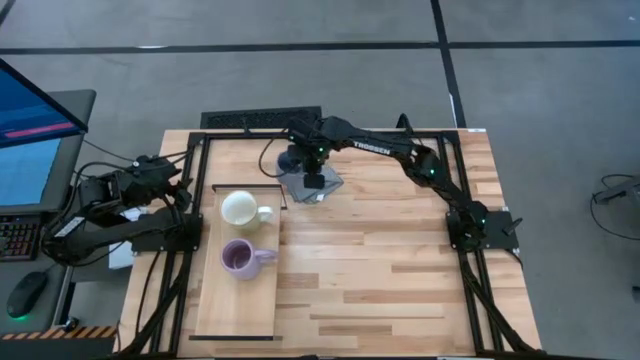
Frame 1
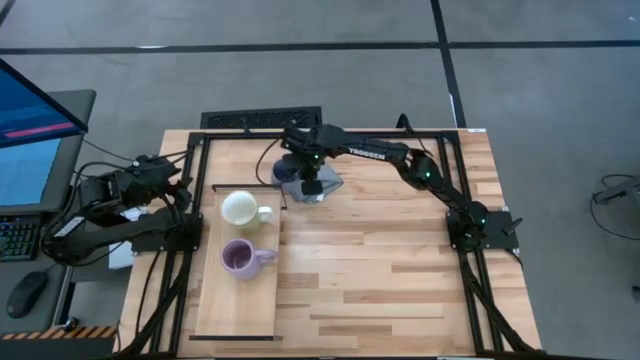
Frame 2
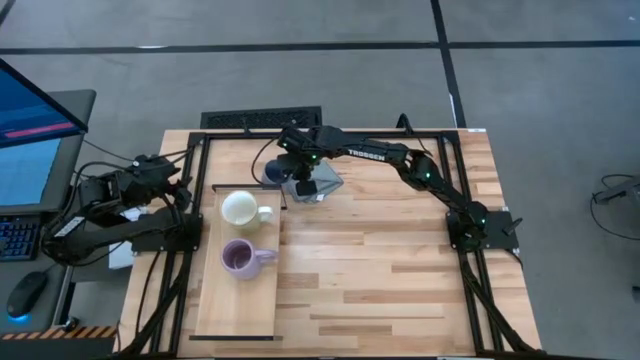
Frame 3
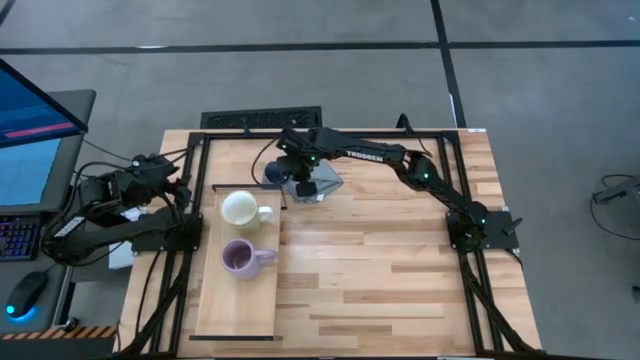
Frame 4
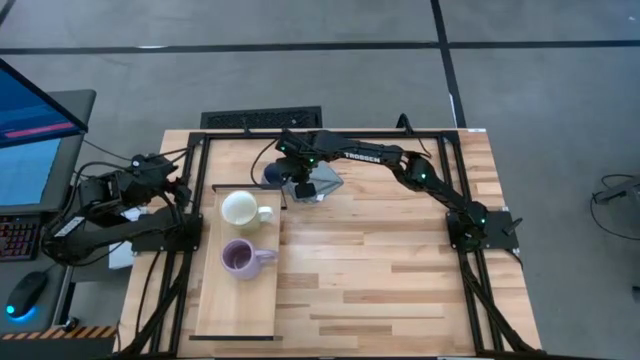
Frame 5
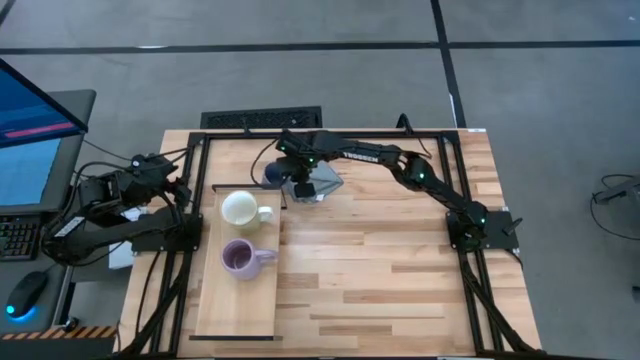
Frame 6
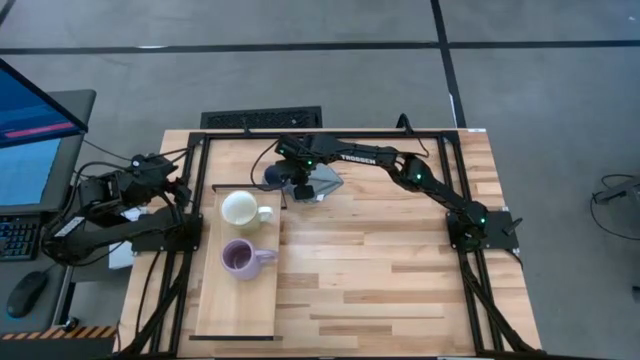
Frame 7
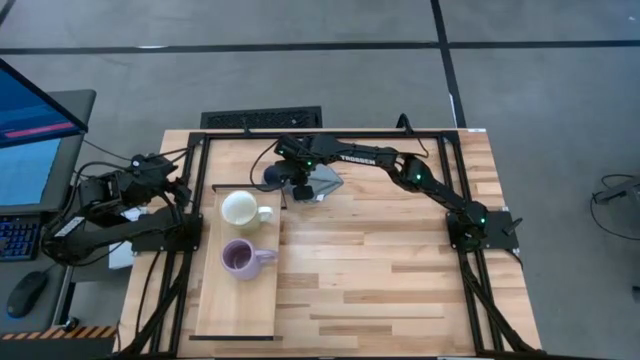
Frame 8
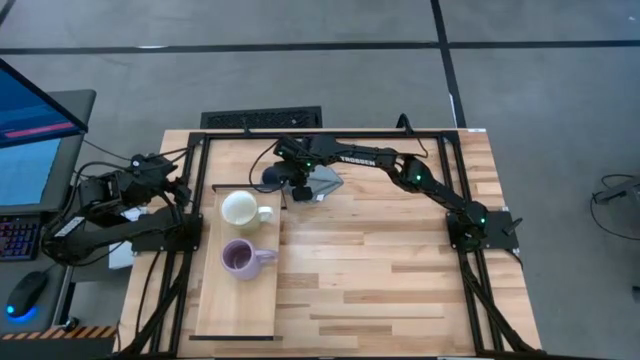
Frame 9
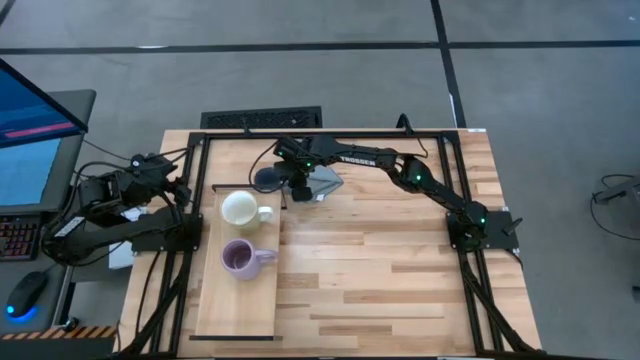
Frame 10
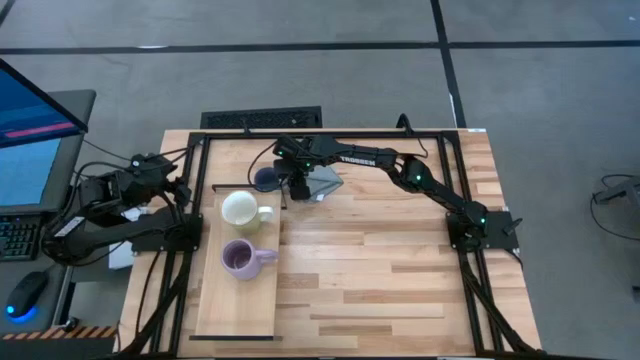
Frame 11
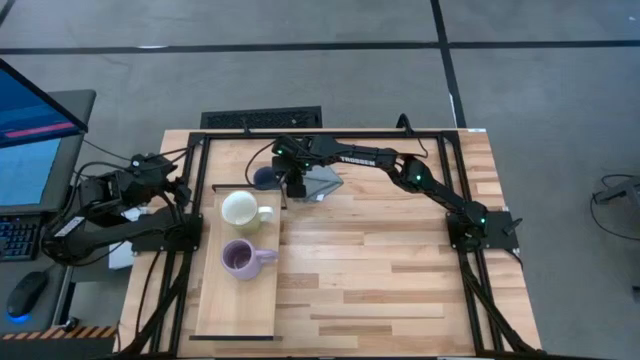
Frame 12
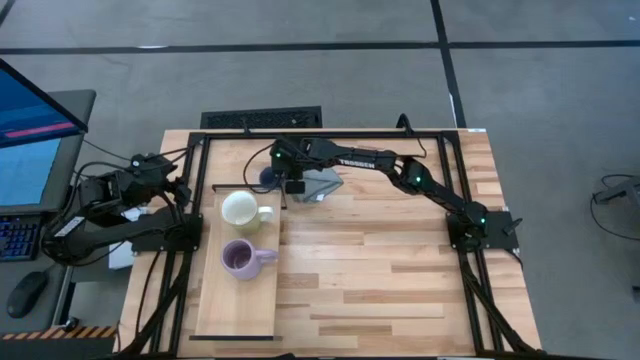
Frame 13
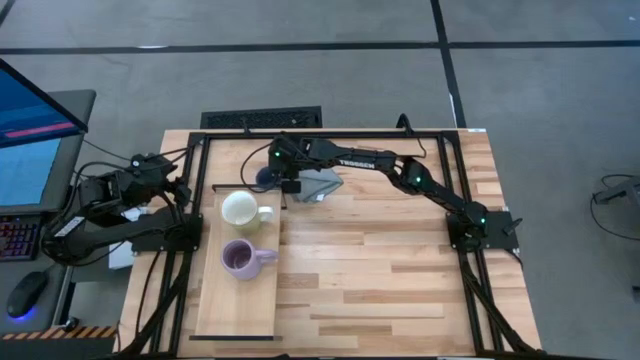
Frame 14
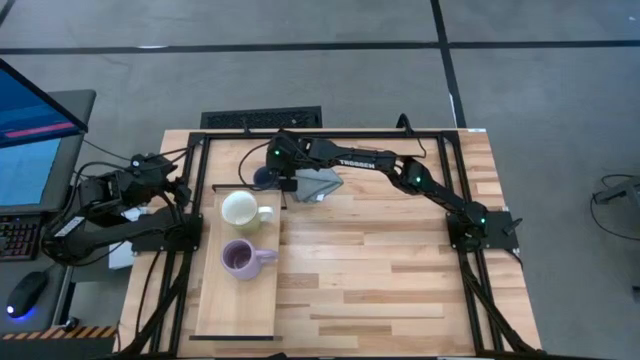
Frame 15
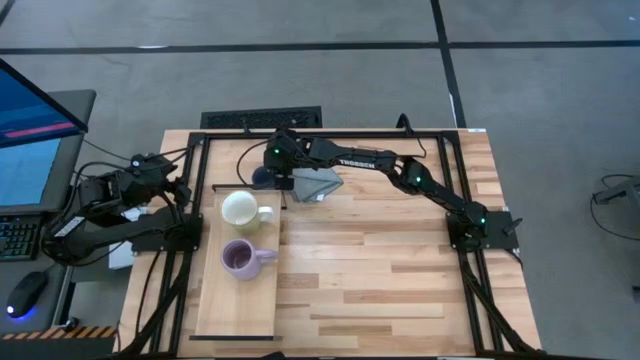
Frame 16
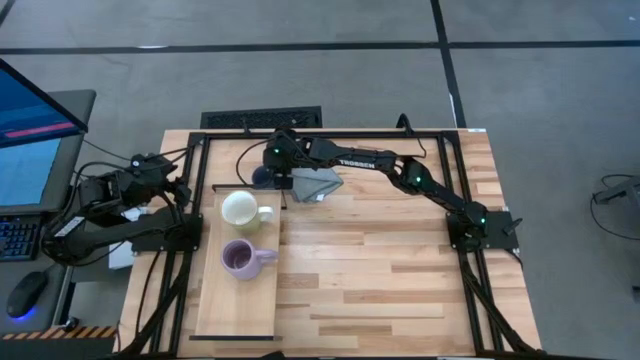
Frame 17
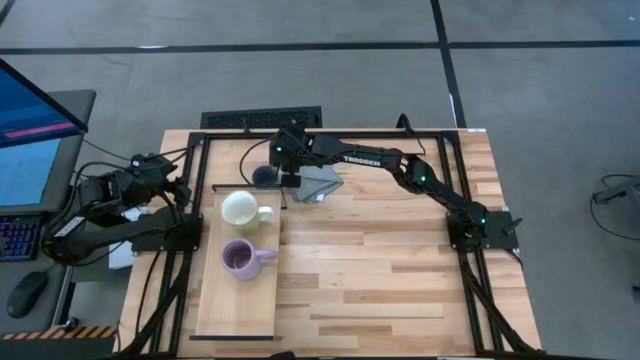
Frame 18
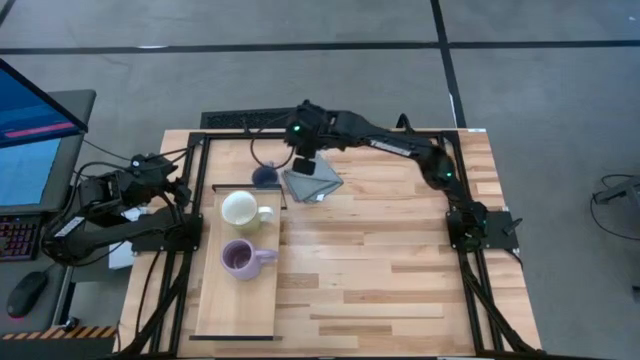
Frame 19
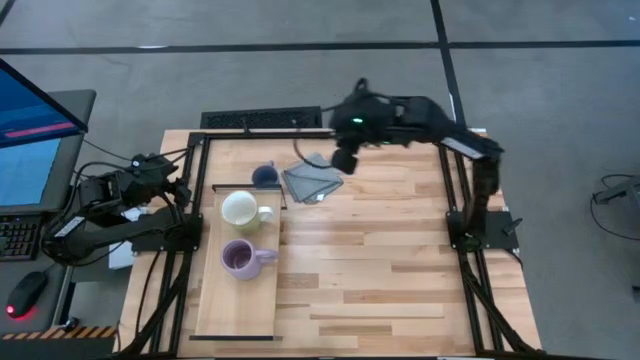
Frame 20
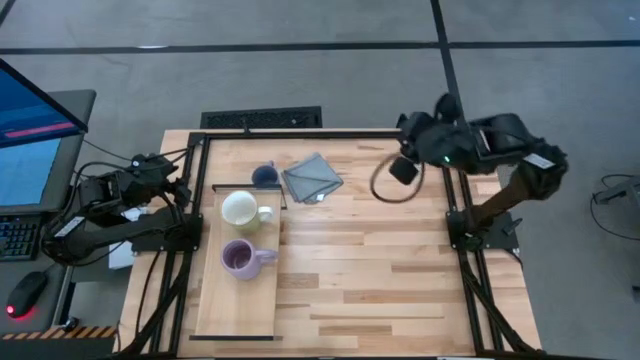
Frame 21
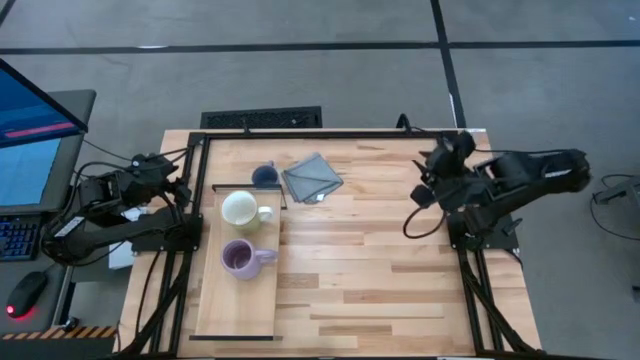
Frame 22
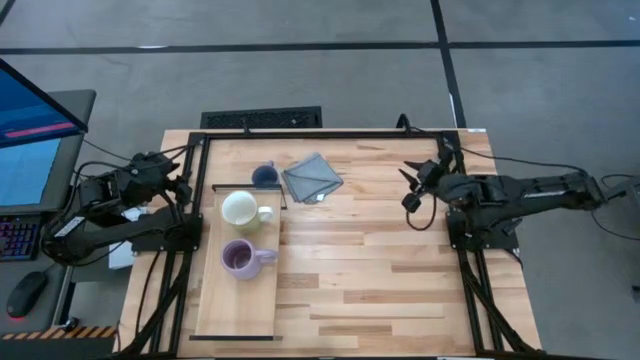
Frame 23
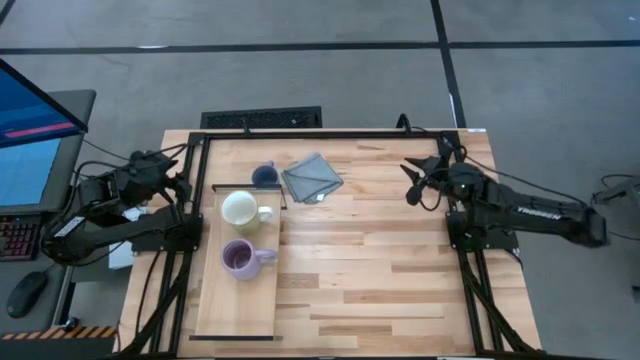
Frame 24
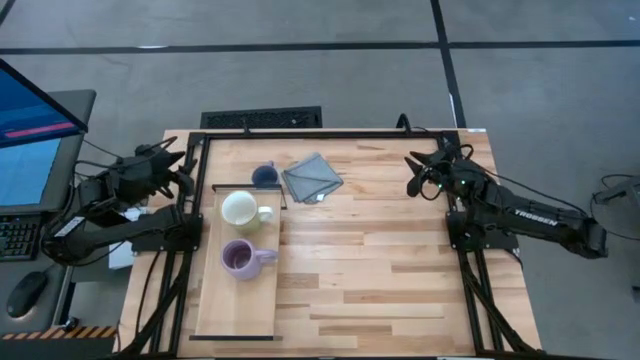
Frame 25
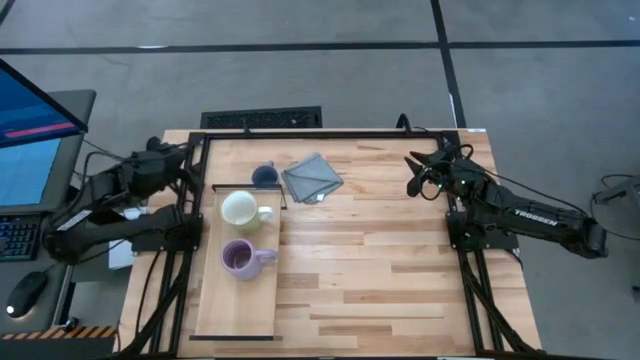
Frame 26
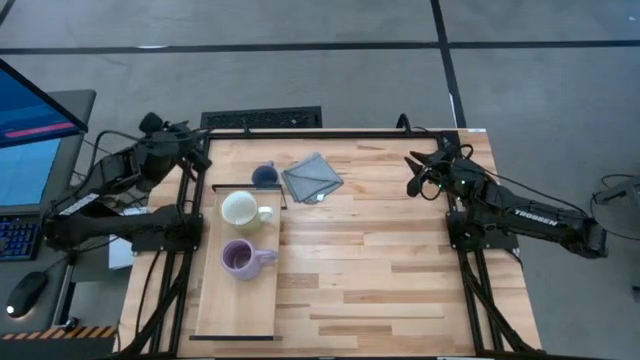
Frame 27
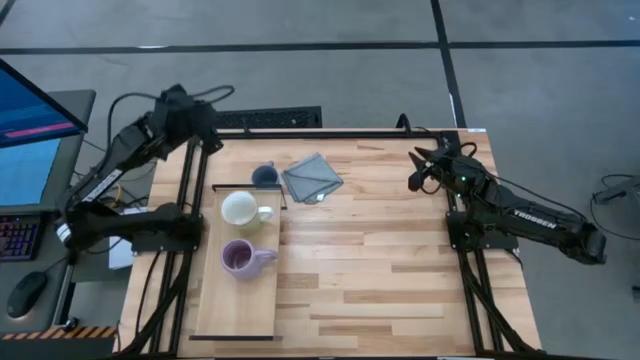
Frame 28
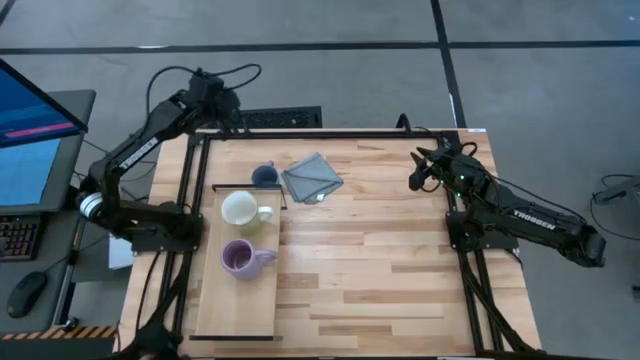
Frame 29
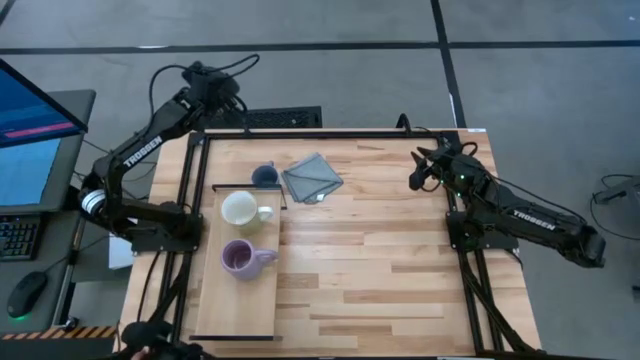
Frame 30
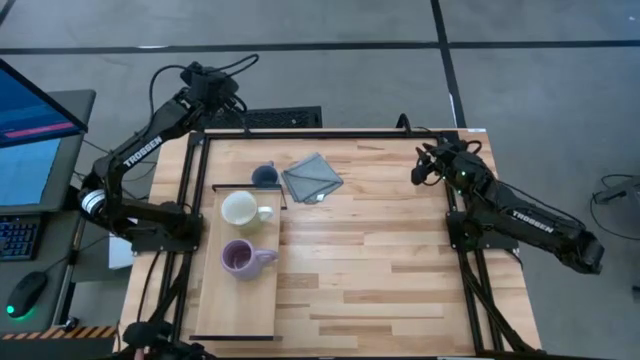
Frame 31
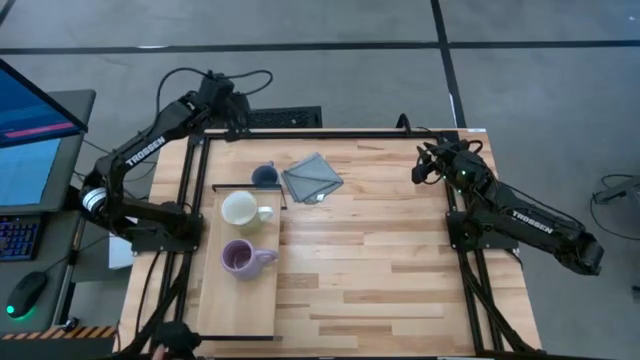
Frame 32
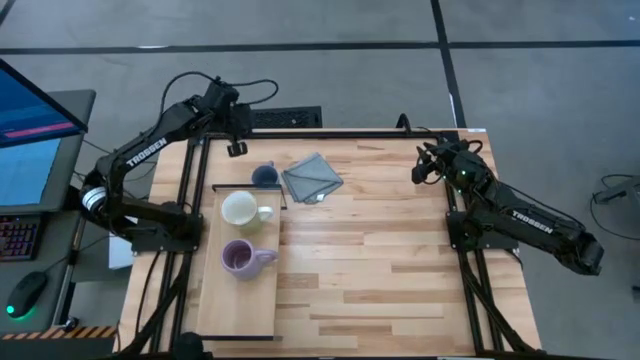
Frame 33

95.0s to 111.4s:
Task: Stack small to large cups/mugs on shelf
Put the blue mug on the shelf

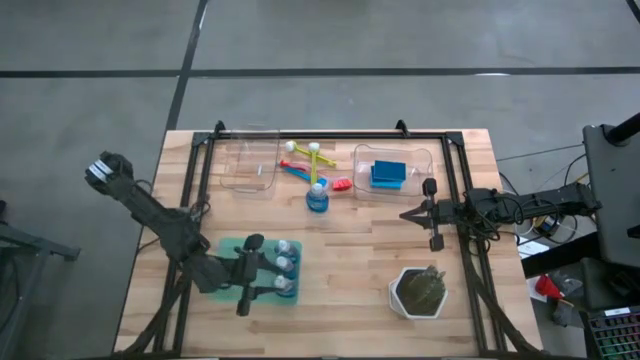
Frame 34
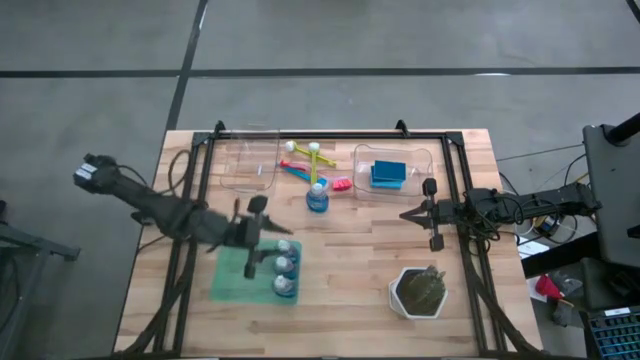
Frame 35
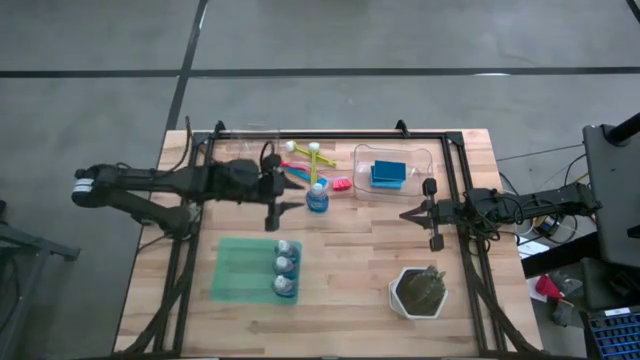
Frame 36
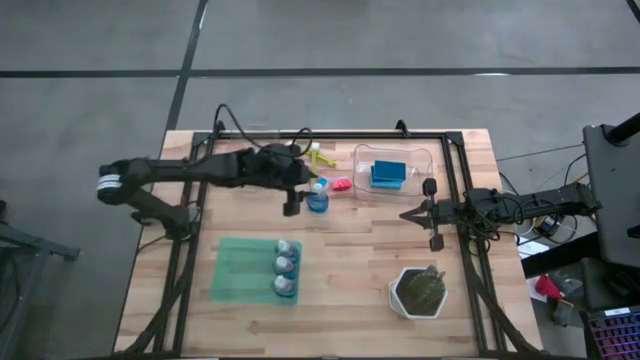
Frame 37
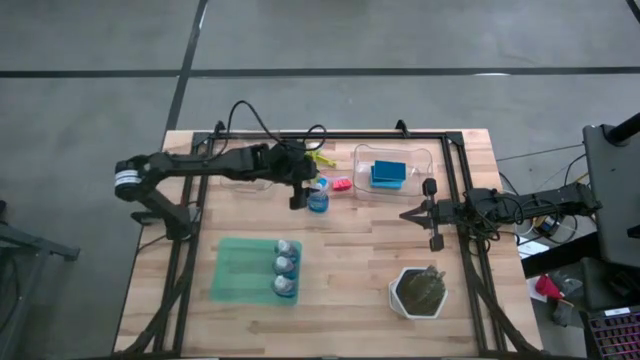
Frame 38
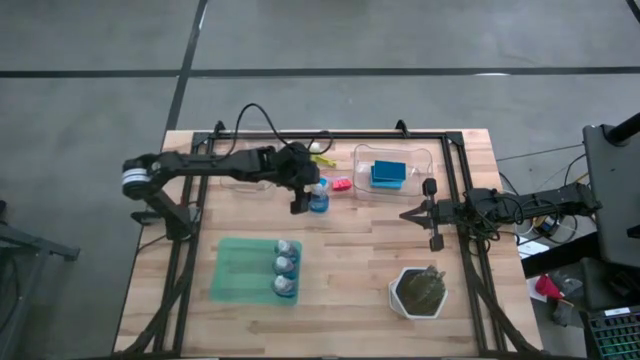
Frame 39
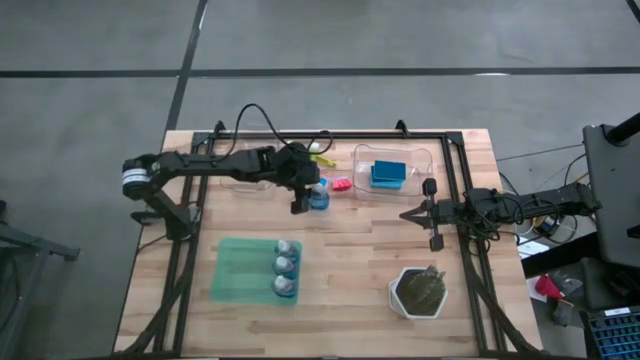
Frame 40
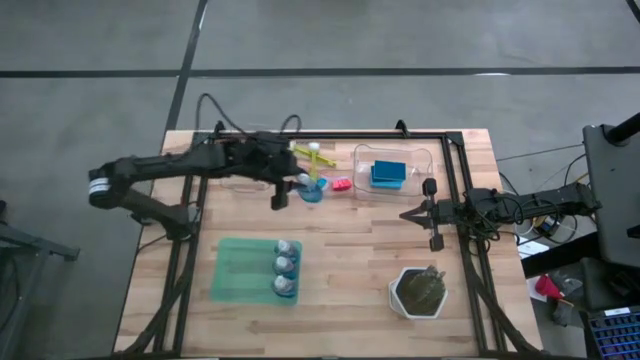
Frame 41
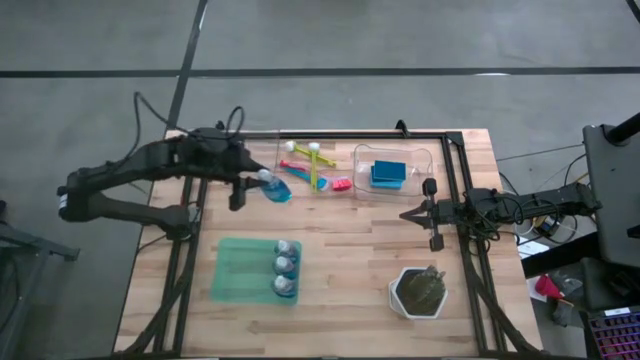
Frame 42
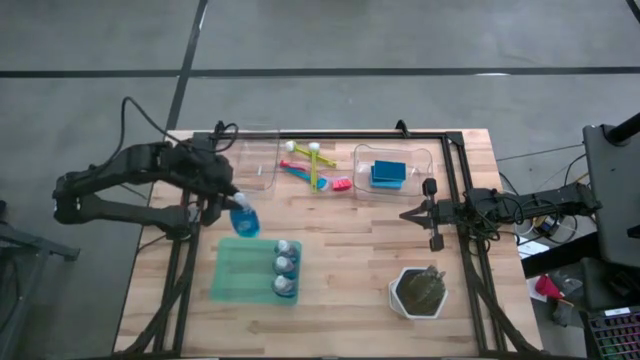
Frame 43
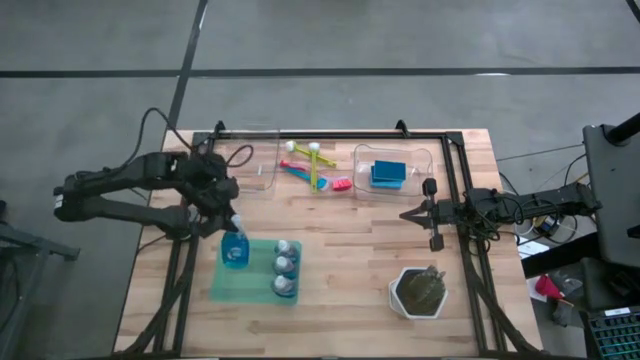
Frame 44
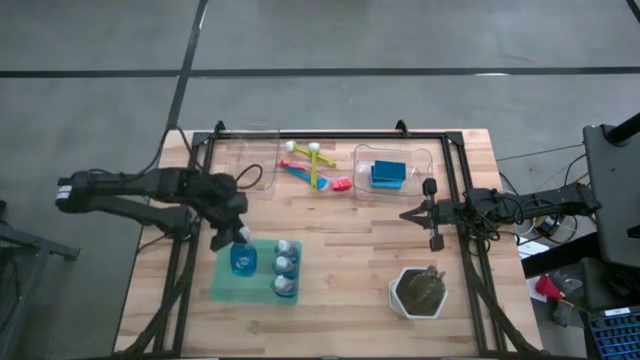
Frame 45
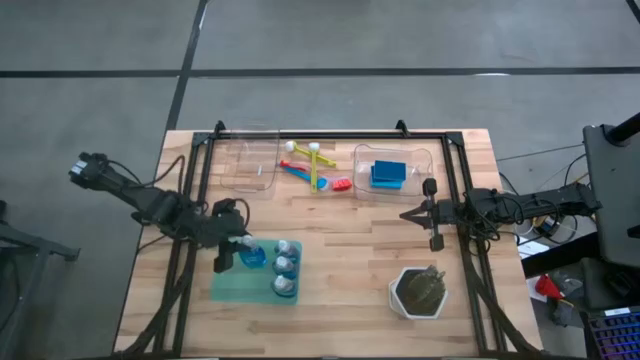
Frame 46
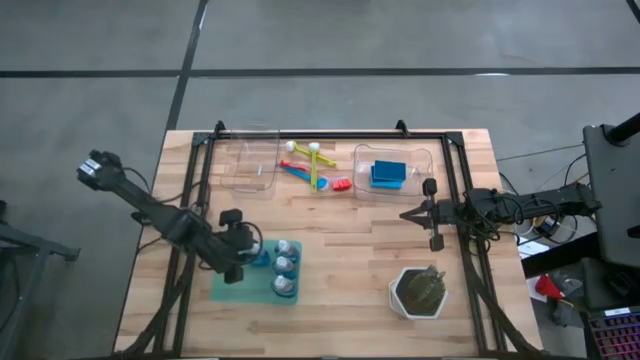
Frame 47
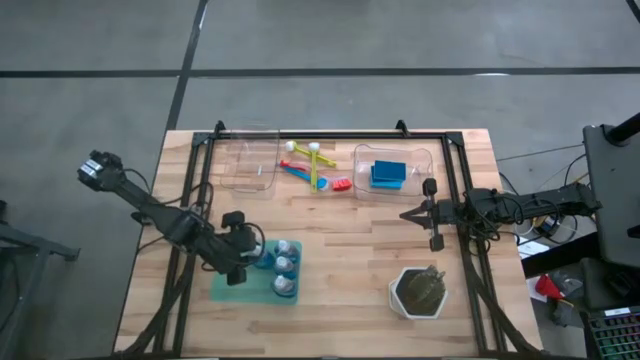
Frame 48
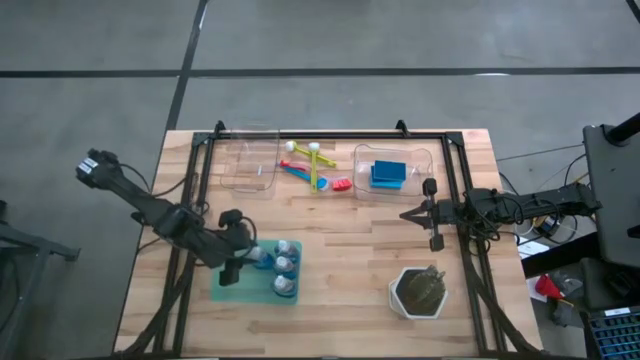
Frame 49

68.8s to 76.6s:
Task: Pick & Place Kitchen Sink Supplies
Put the blue dishwashing liquid bottle into the green bin
